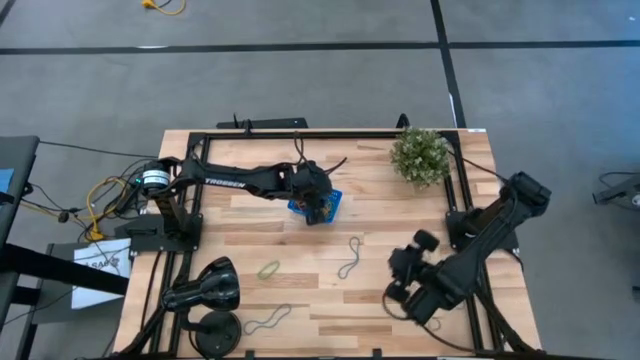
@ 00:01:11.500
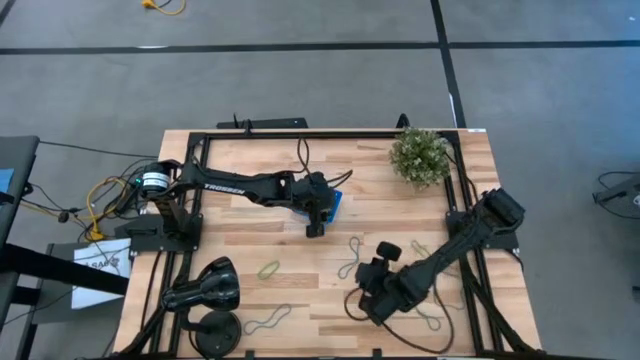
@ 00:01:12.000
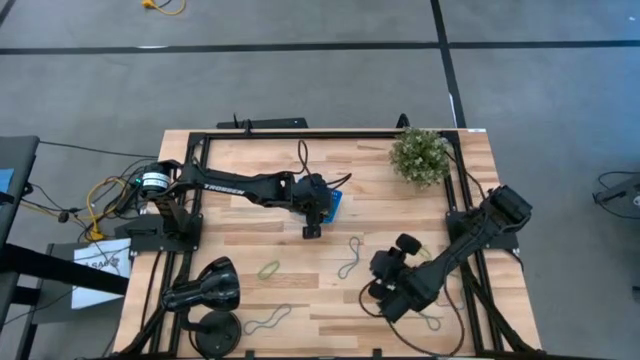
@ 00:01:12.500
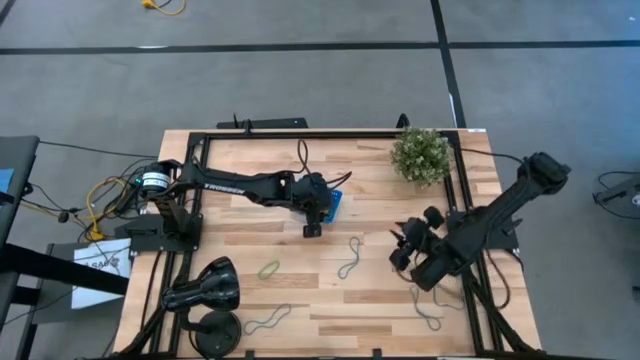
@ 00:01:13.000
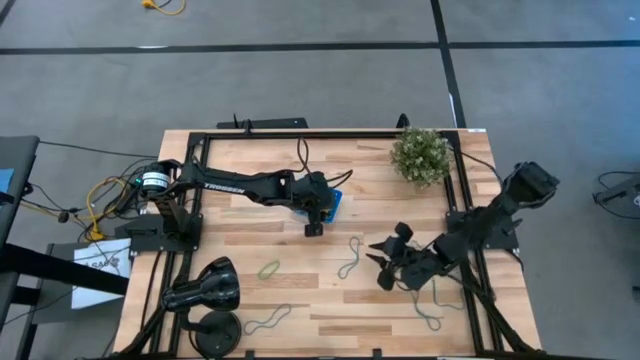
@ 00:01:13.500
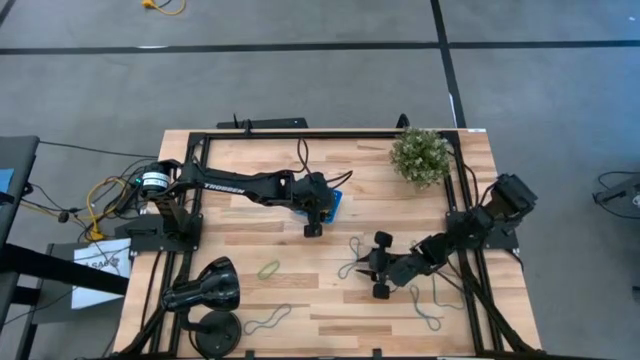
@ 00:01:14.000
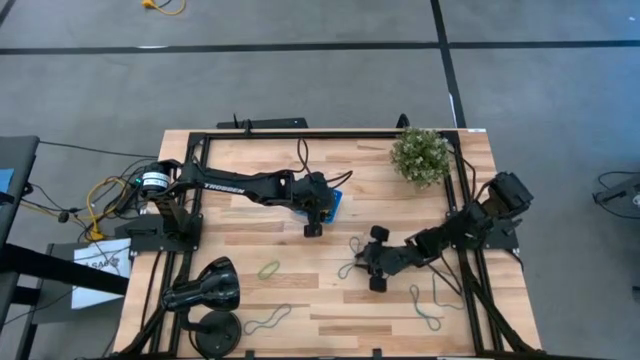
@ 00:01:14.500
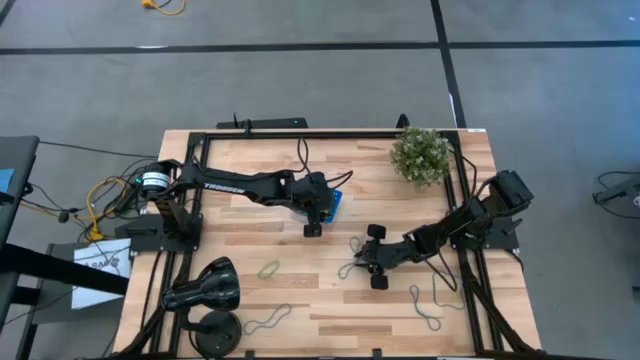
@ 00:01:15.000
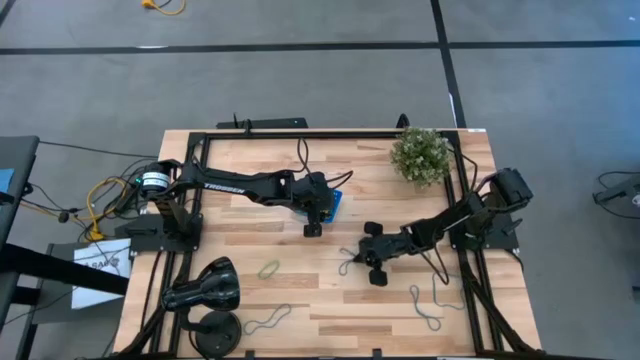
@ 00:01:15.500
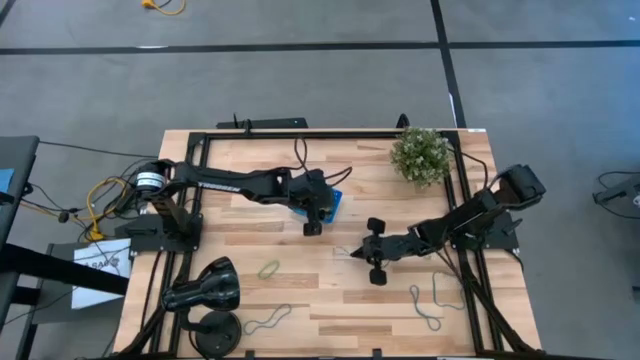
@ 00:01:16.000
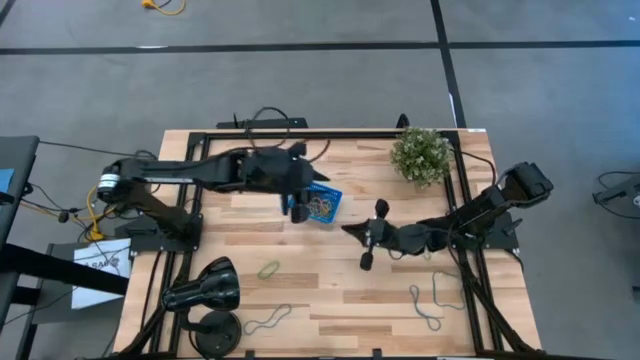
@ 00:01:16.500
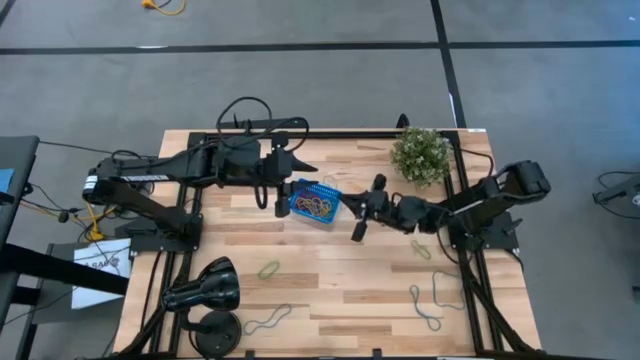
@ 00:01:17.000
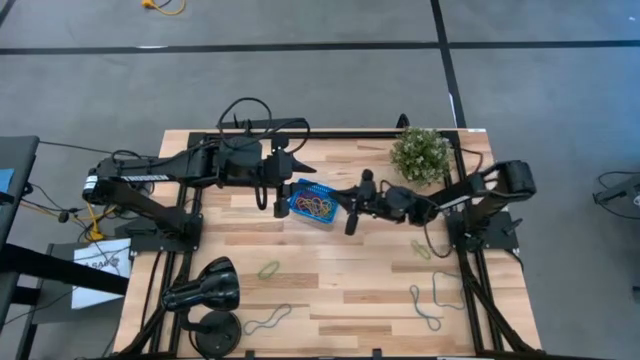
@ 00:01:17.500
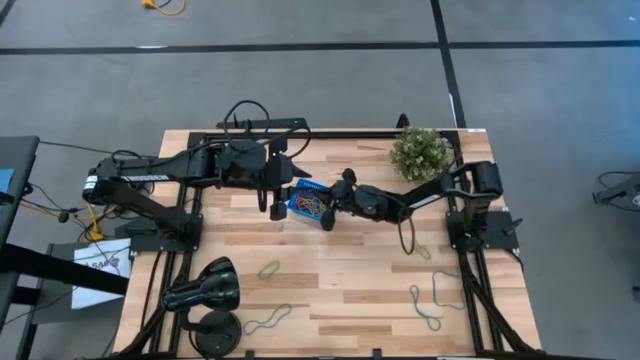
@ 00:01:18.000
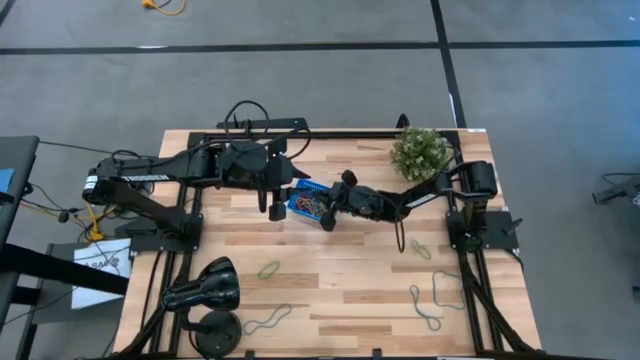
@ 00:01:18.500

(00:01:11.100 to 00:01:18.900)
Task: Pick and place items into bin
Put the blue rubber band into the blue bin

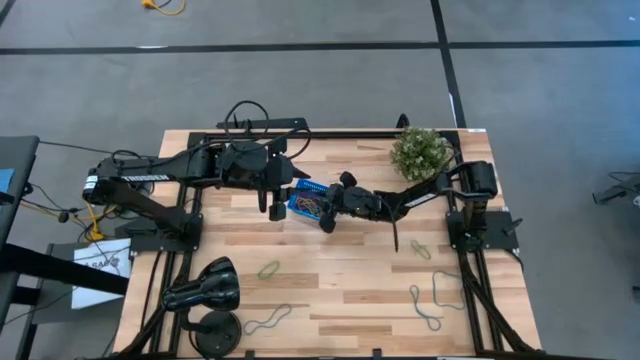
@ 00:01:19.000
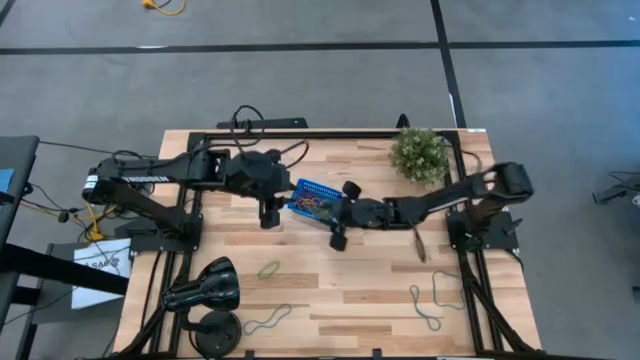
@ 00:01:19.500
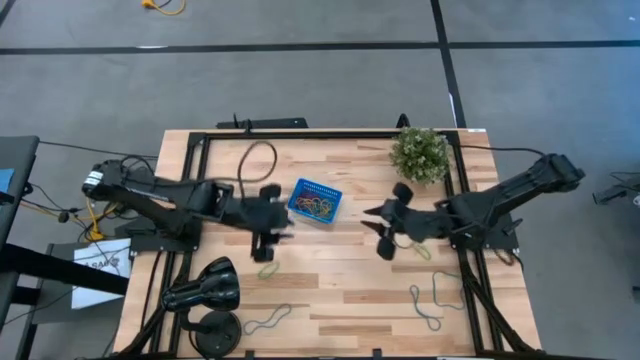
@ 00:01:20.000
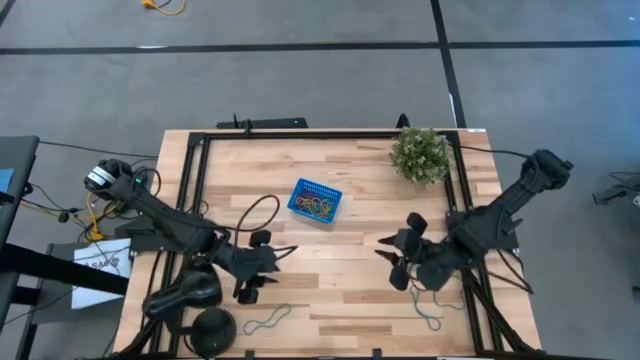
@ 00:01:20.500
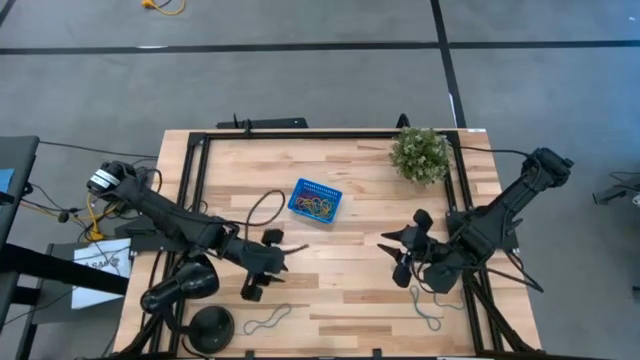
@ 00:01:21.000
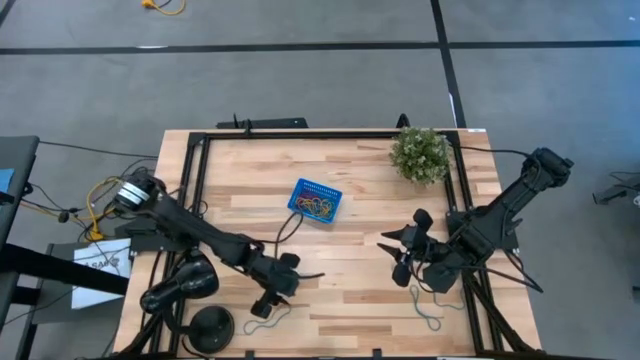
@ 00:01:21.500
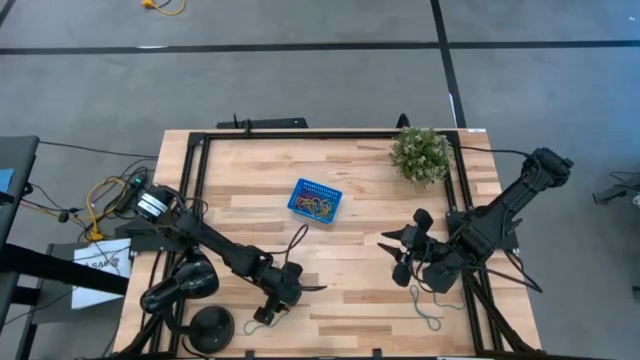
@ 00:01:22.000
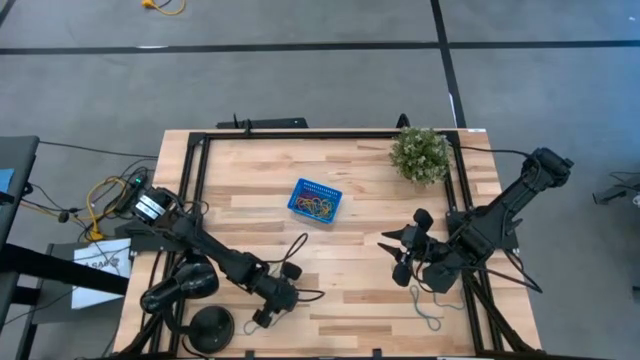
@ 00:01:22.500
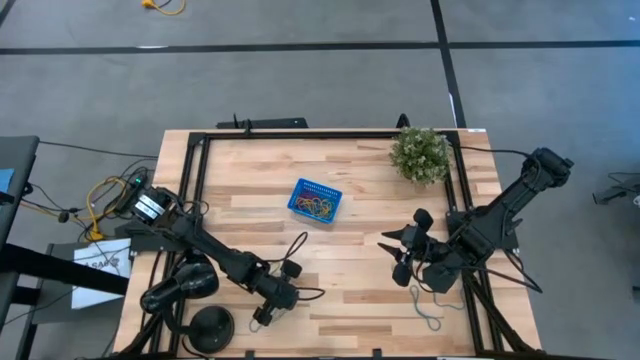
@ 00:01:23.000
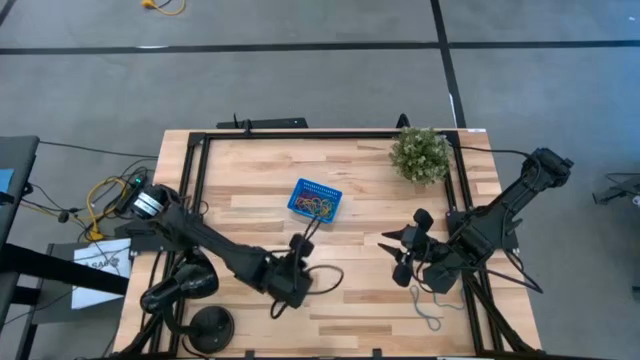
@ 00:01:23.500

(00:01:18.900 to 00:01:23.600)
Put the blue rubber band into the blue bin

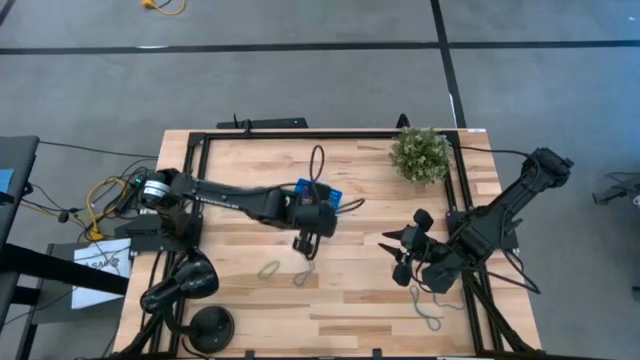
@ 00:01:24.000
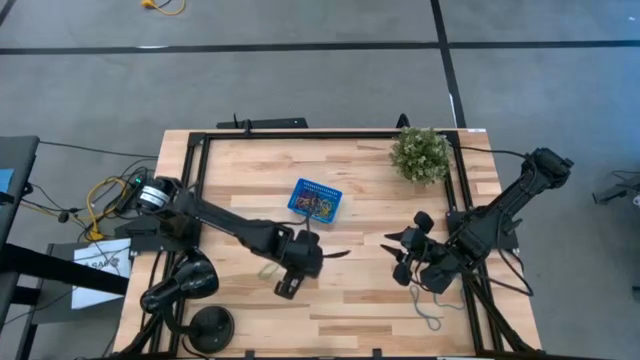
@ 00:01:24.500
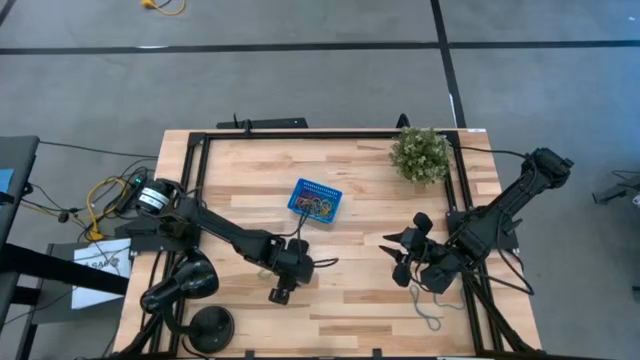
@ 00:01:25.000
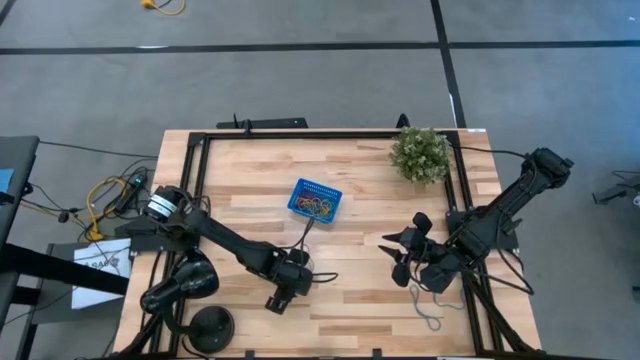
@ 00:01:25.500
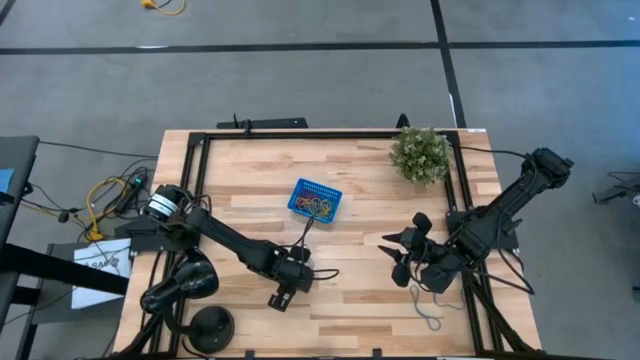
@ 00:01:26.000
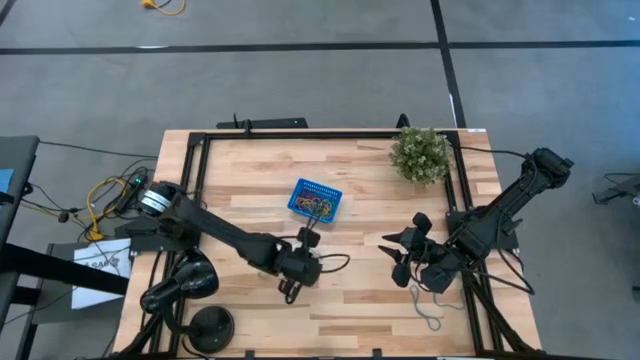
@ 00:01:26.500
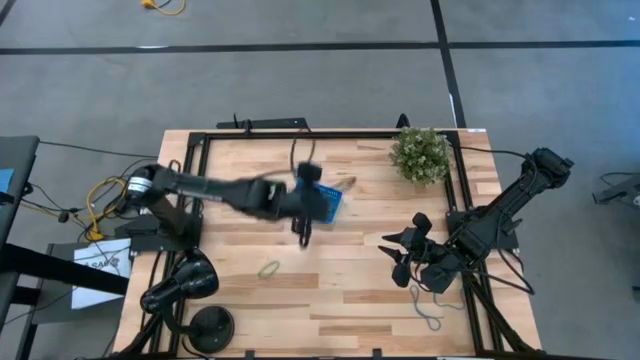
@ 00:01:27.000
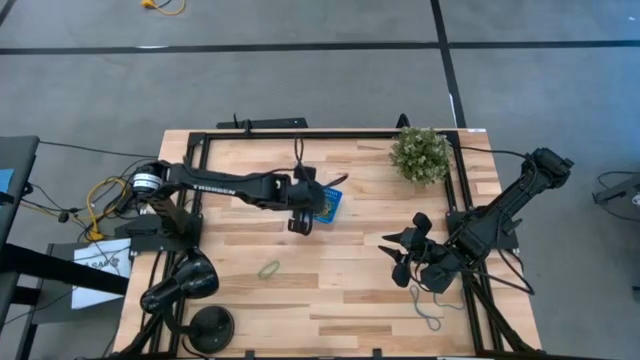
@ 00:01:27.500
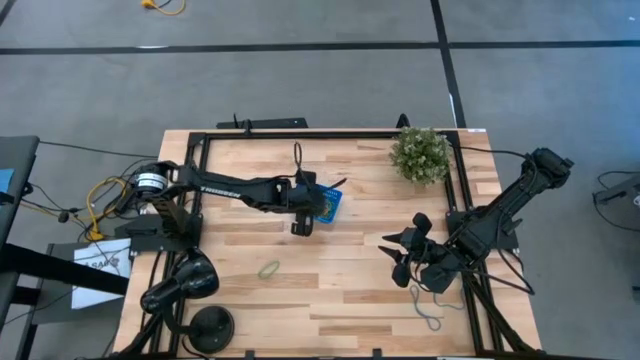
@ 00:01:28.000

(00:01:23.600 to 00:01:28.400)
Put the blue rubber band into the blue bin

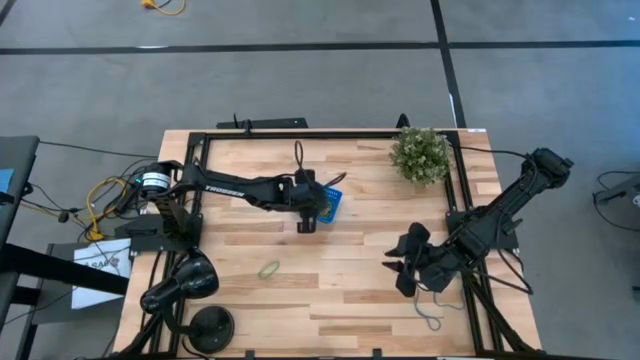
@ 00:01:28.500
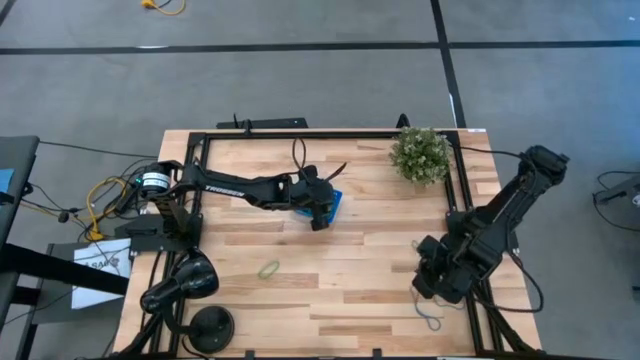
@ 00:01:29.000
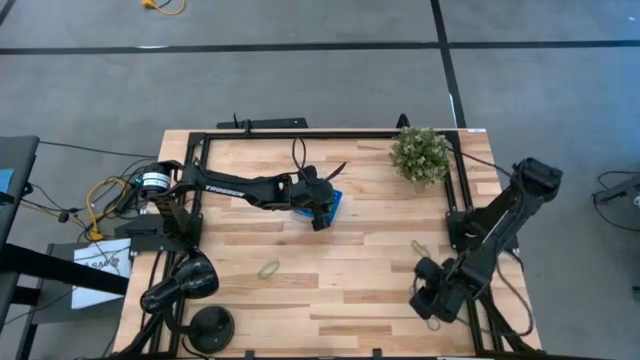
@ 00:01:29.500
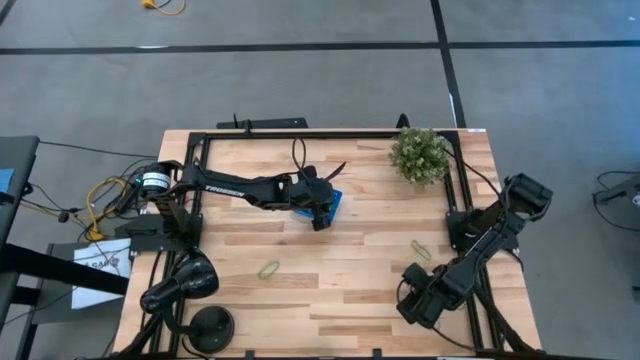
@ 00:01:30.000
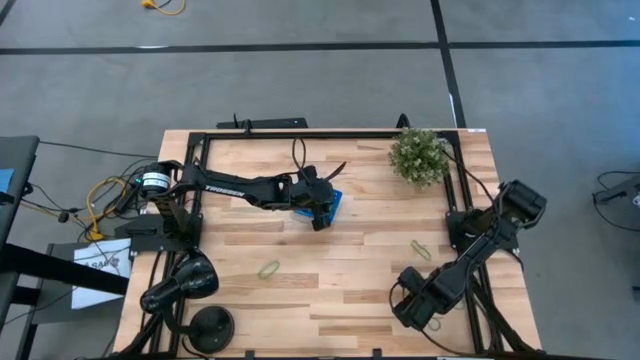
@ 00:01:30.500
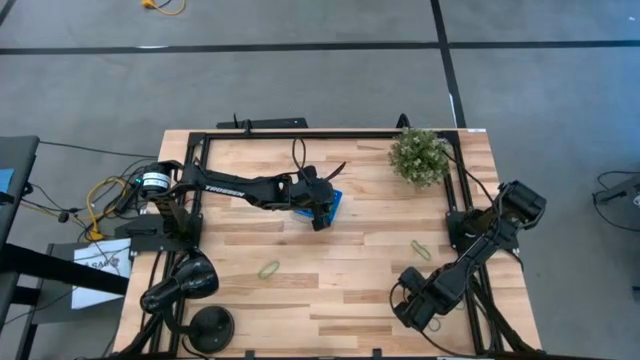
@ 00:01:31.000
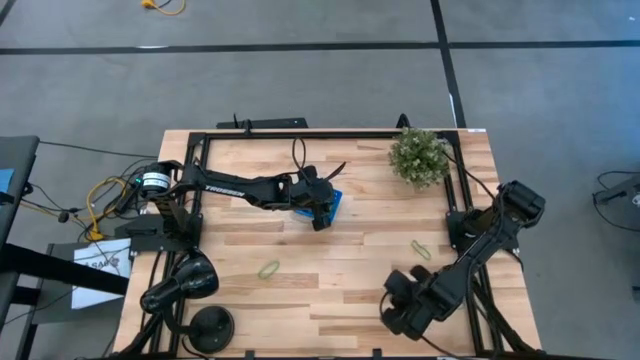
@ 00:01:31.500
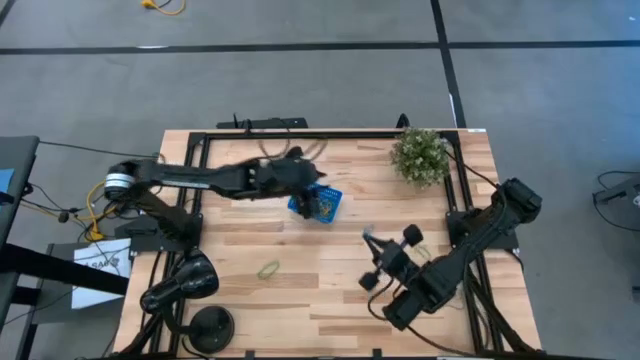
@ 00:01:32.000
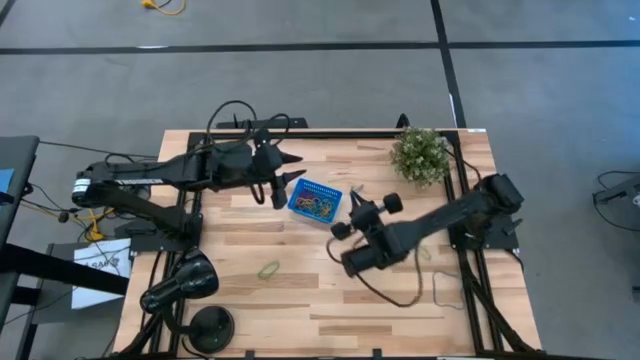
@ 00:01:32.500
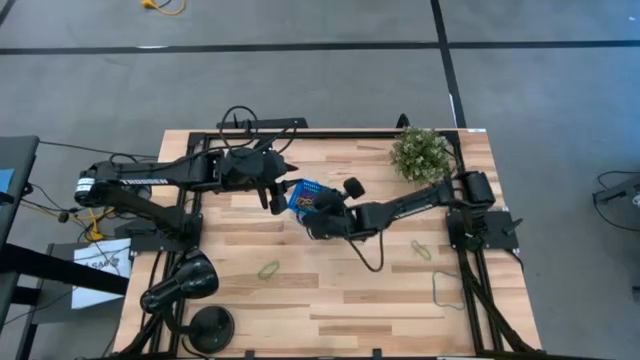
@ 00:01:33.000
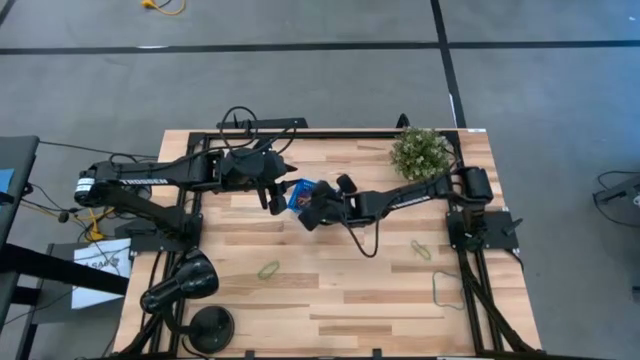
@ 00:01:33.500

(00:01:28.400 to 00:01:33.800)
Put the blue rubber band into the blue bin
